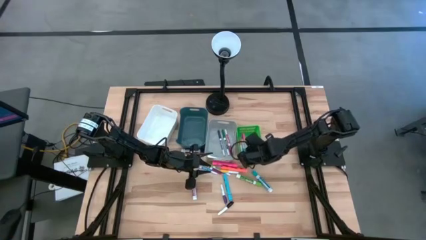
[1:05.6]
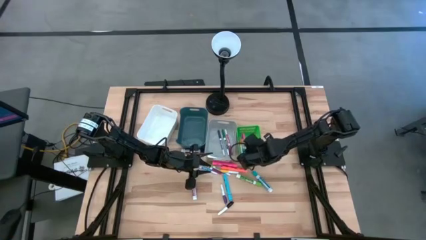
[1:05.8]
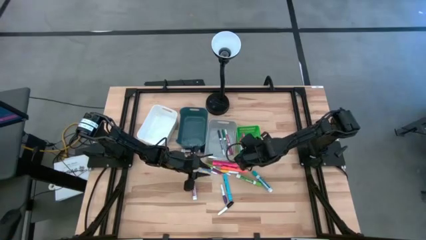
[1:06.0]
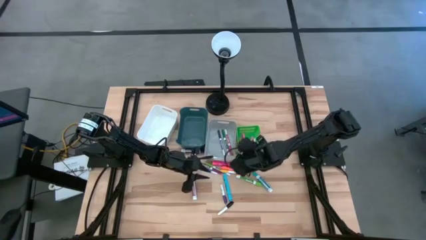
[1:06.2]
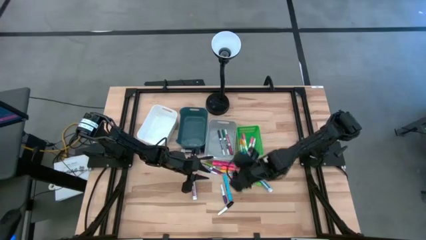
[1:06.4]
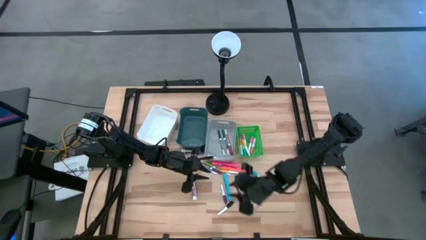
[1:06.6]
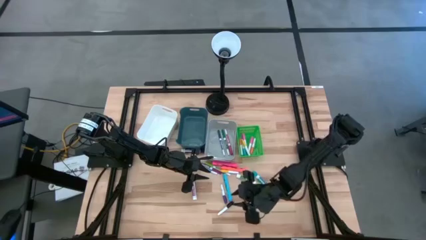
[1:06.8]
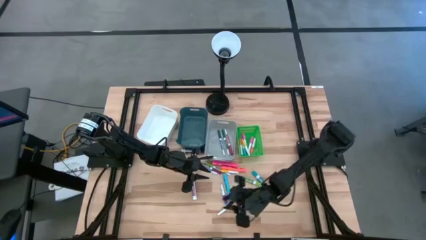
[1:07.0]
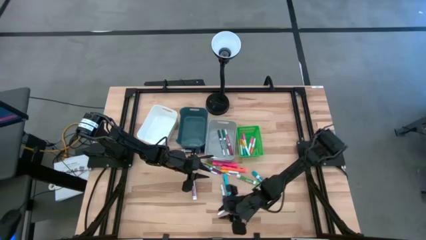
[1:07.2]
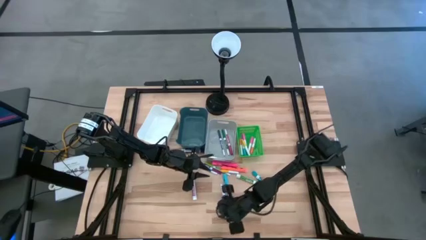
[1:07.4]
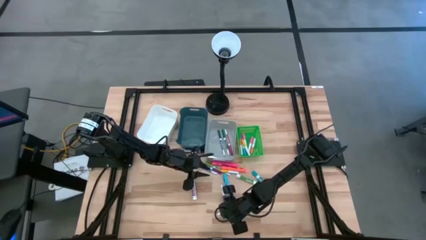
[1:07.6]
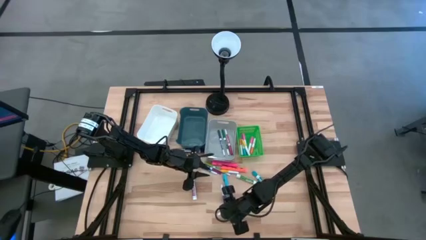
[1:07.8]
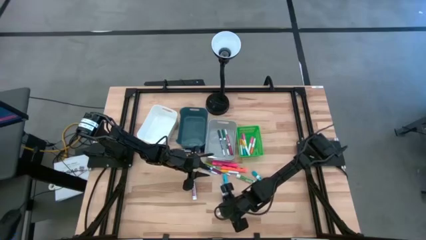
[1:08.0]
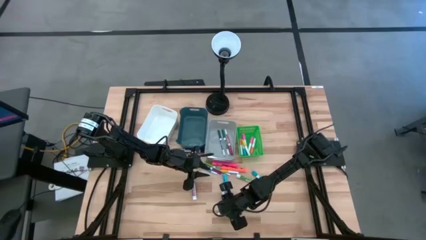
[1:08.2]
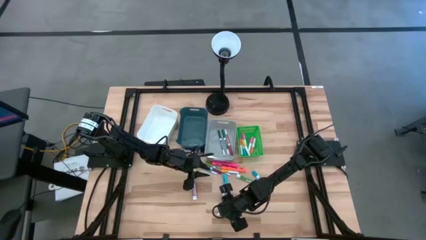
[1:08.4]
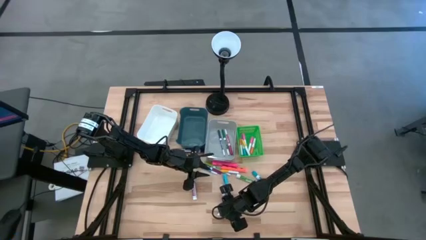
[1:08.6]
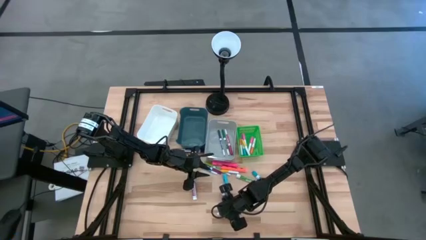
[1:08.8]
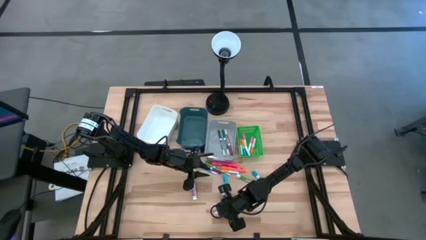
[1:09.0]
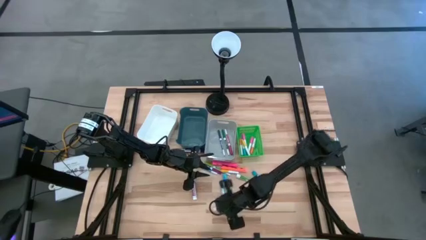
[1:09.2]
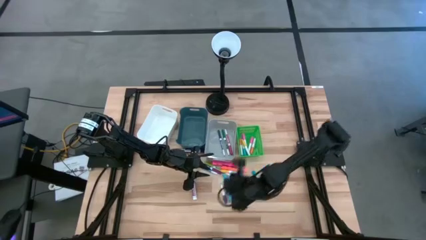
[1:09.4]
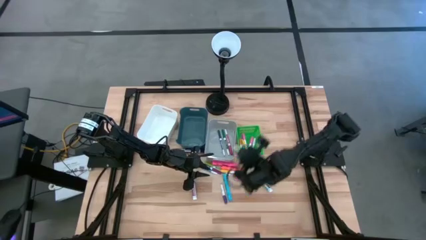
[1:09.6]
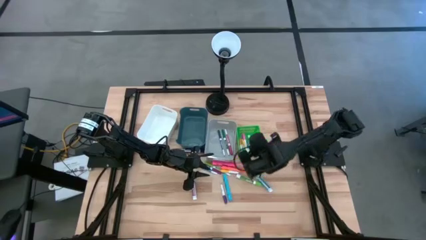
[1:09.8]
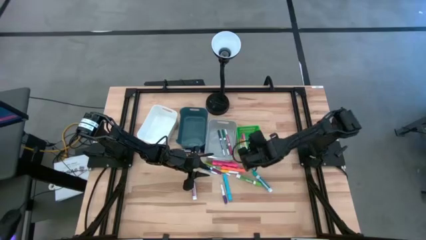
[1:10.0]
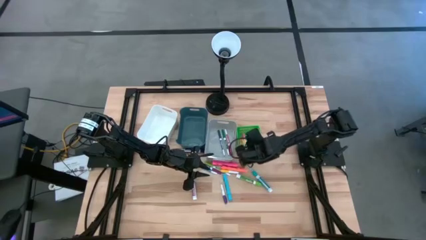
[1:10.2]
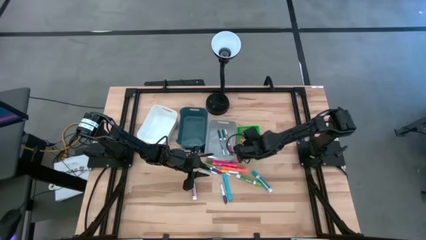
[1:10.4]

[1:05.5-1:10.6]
Task: Pick & Place Markers
Put the small black highlighter pen into the green bin

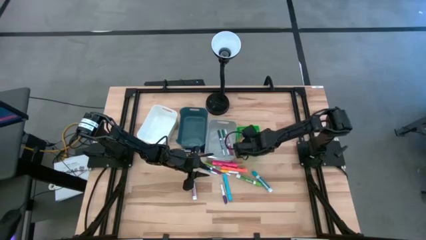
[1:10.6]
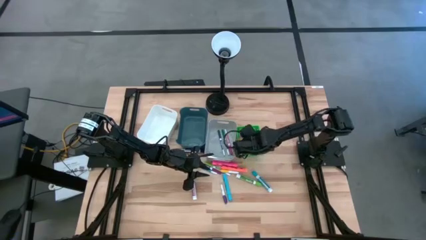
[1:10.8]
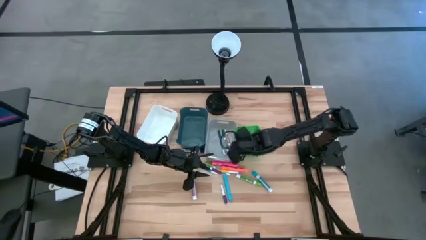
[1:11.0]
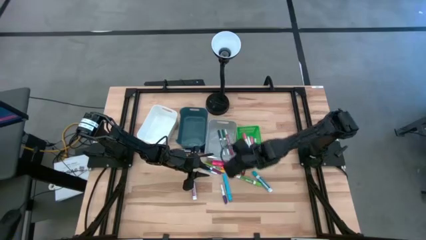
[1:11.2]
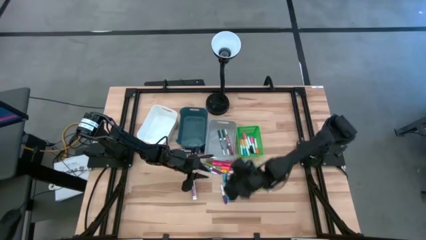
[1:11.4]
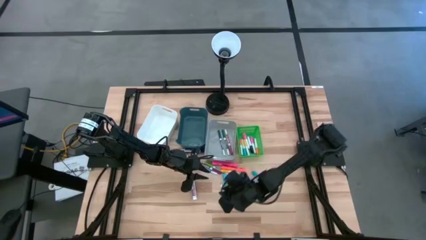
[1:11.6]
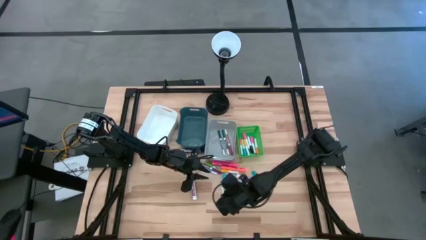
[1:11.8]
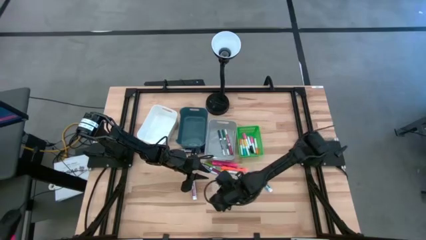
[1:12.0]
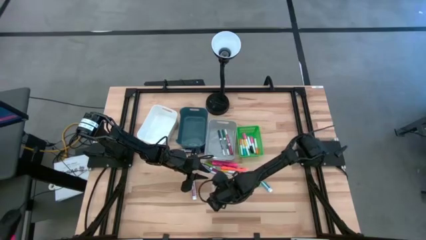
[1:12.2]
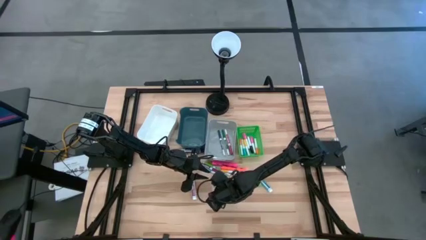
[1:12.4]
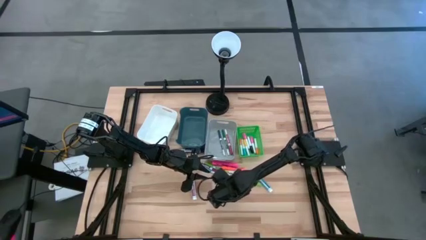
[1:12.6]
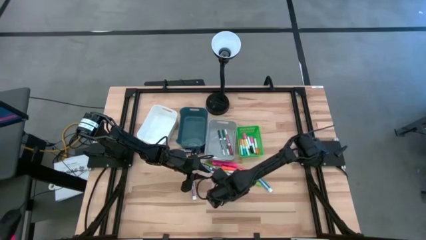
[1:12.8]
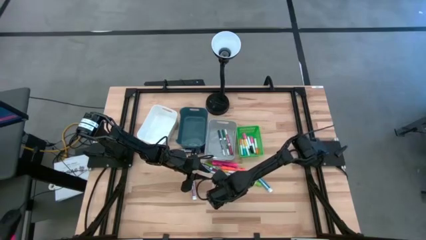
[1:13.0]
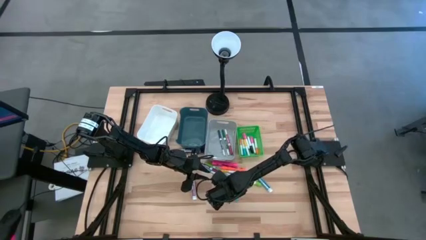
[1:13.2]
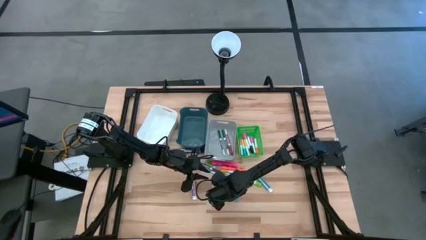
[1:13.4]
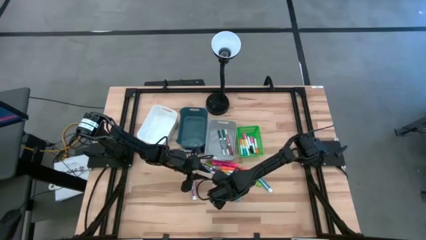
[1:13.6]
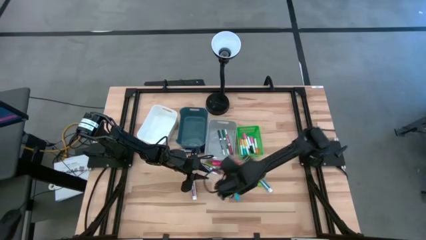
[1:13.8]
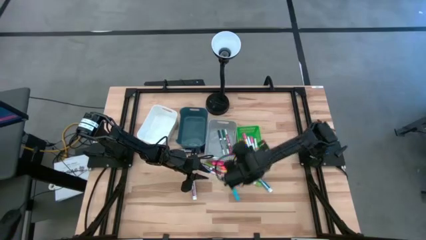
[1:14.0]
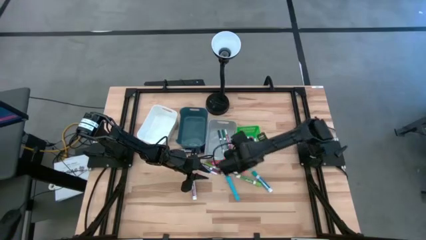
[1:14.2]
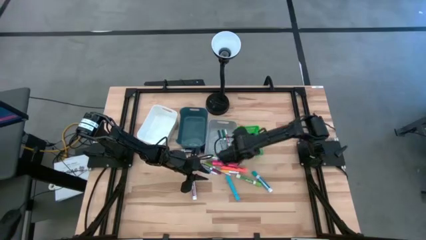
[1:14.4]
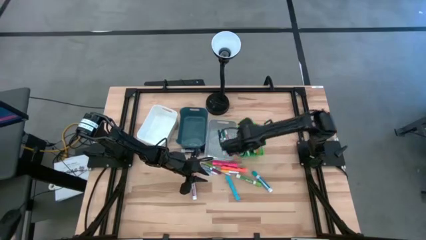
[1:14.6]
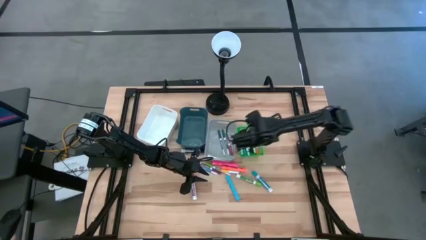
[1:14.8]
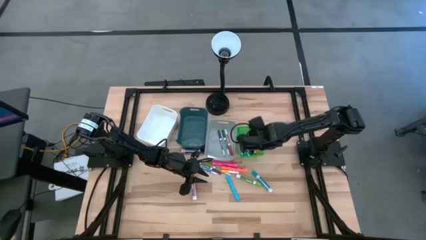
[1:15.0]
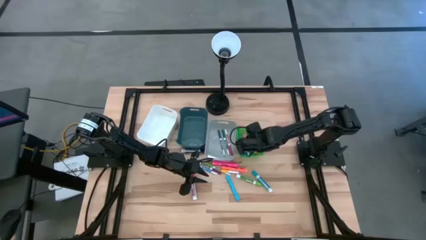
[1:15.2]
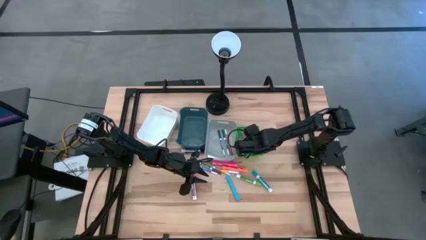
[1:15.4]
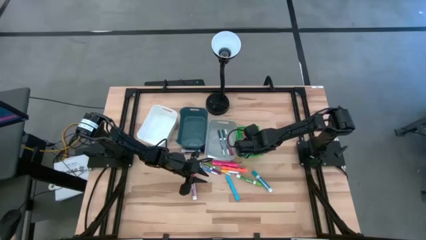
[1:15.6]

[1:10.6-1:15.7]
Put the small purple highlighter pen into the green bin

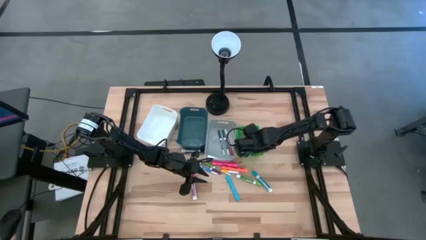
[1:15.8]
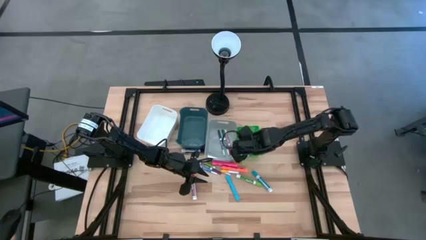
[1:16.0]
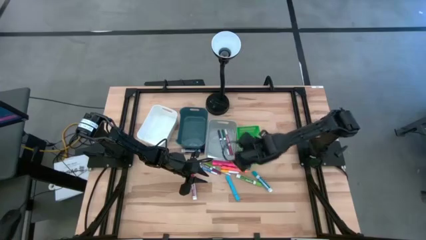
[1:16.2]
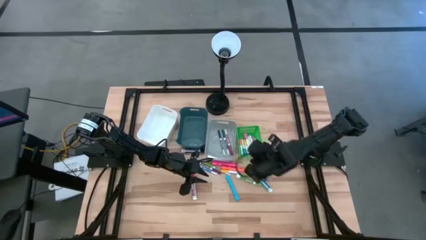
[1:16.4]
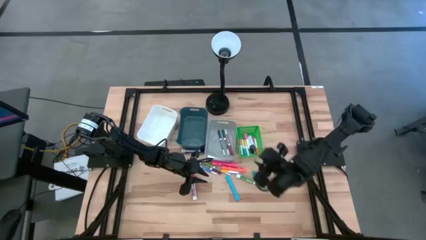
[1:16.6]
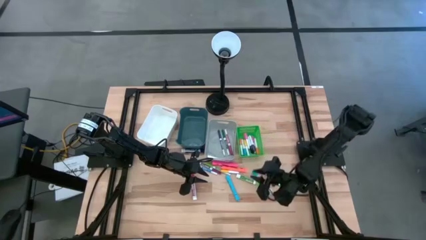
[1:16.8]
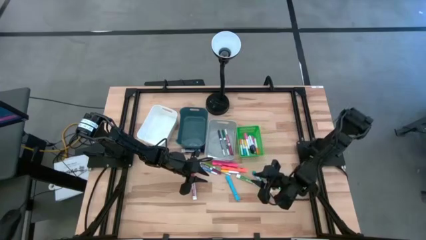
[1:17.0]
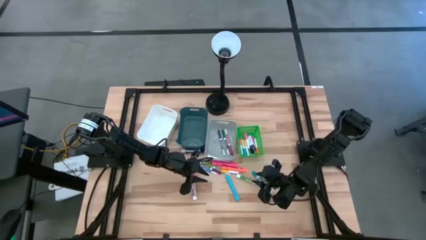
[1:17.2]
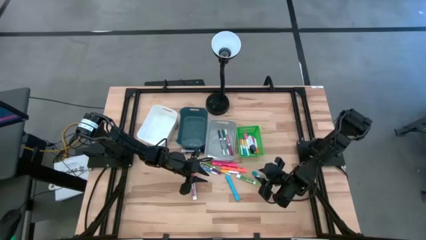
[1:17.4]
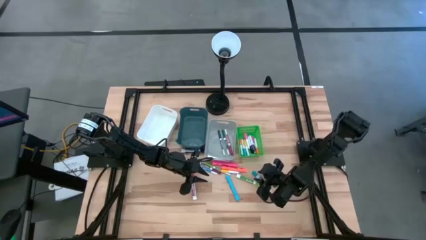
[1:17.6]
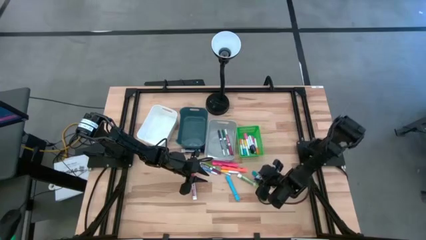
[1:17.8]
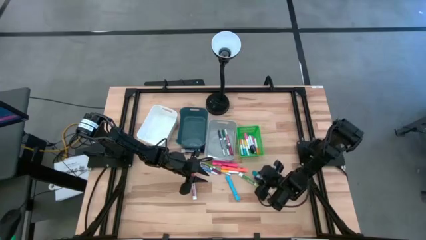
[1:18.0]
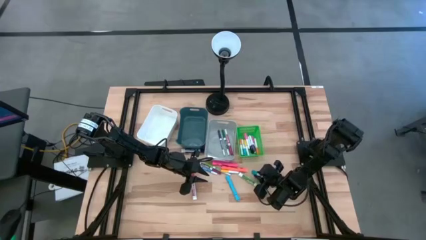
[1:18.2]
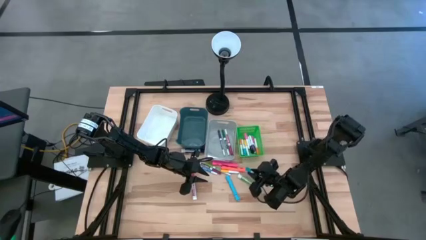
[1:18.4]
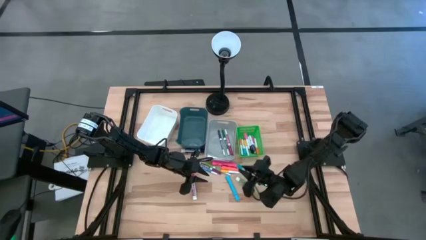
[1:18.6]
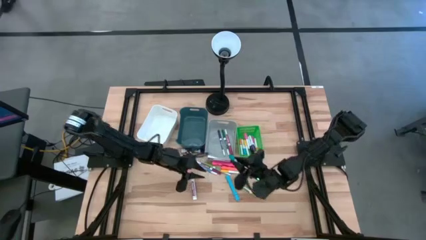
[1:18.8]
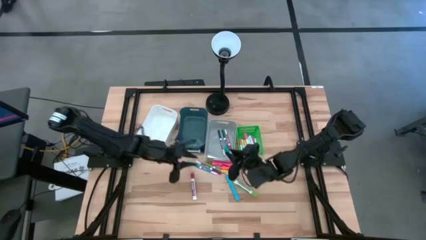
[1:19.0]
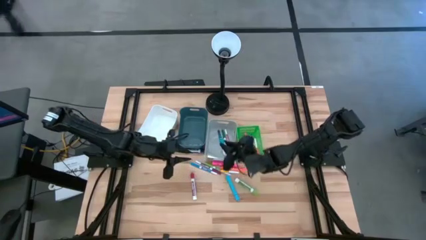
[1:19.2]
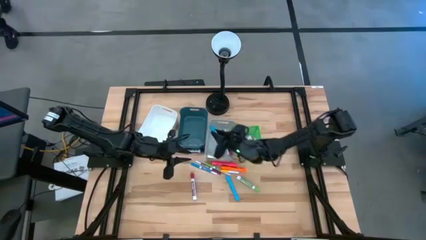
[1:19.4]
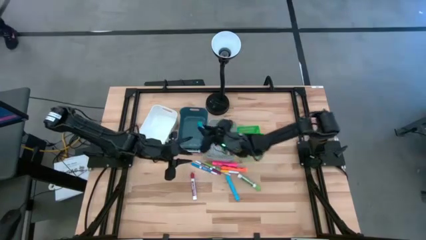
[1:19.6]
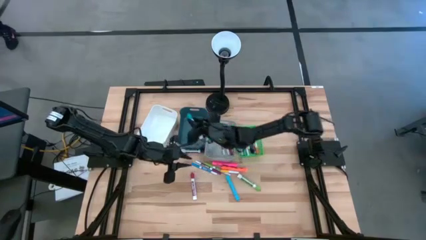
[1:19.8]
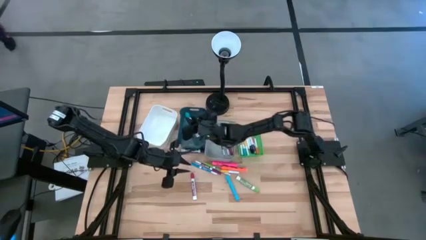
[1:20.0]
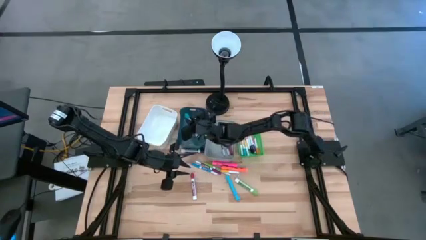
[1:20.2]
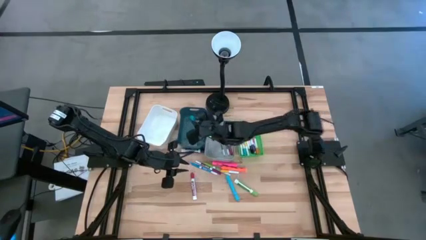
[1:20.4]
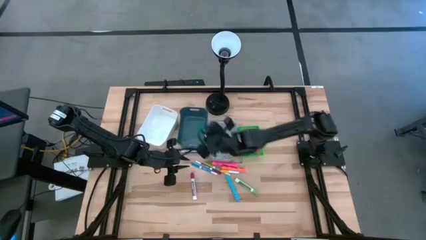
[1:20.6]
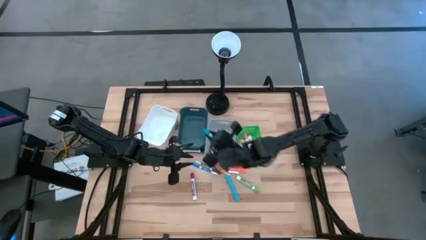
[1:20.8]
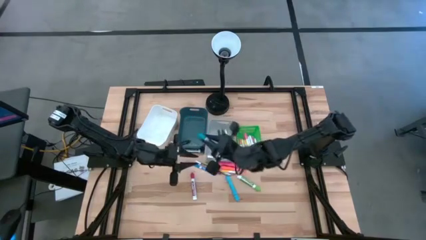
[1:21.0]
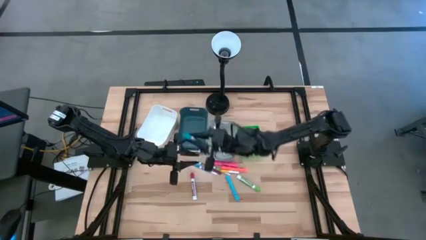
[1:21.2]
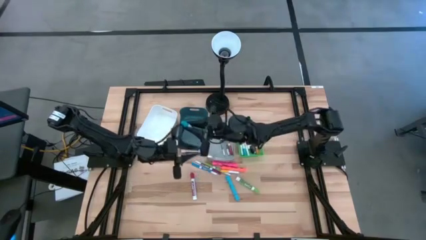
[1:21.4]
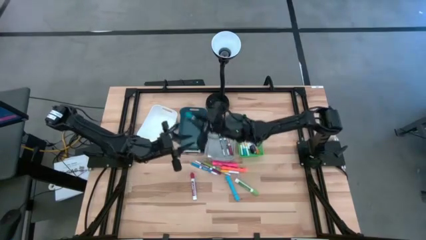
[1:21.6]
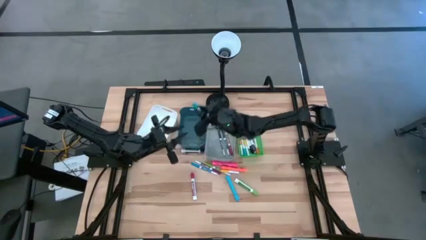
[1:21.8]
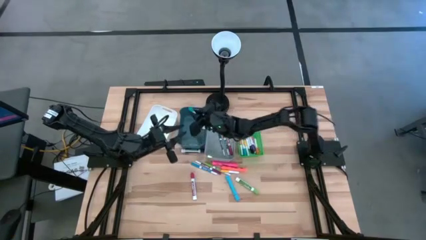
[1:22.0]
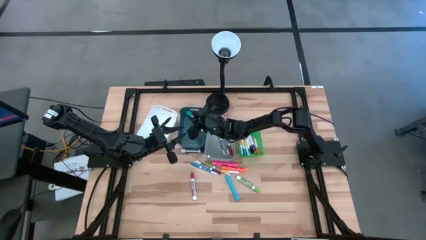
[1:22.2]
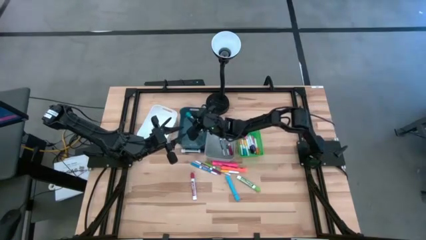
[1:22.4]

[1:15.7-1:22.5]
Put the large blue marker pen into the blue bin
